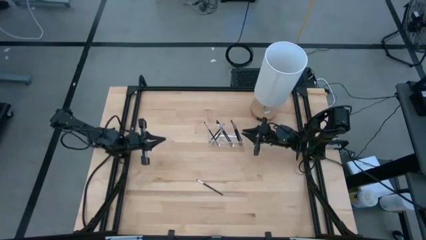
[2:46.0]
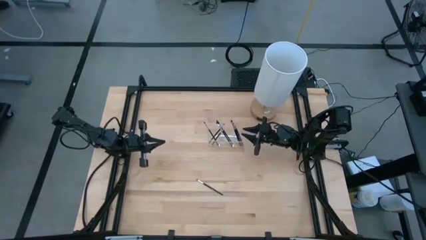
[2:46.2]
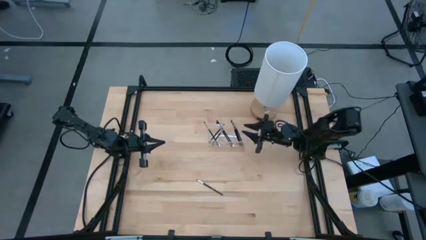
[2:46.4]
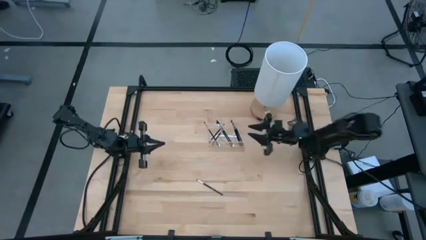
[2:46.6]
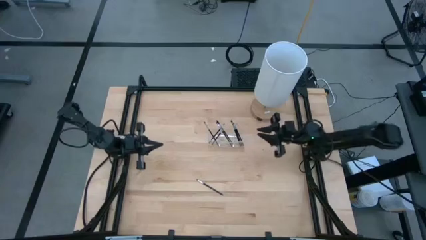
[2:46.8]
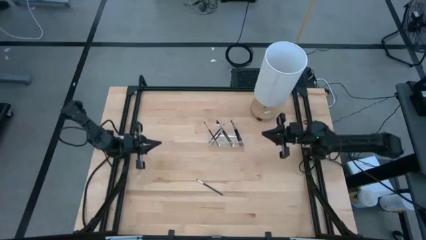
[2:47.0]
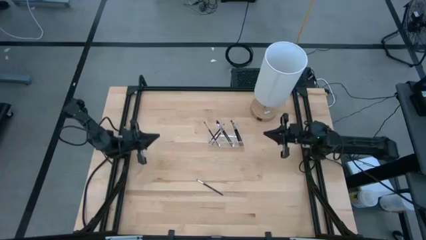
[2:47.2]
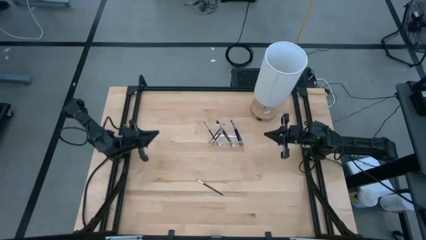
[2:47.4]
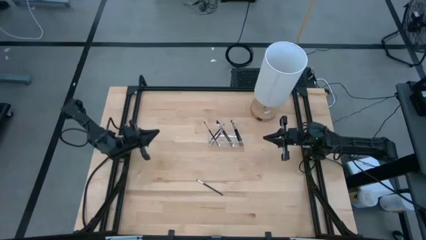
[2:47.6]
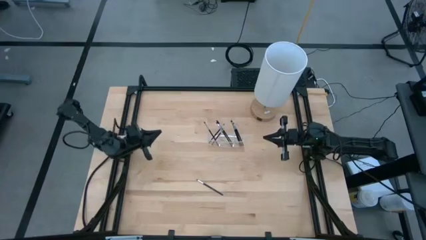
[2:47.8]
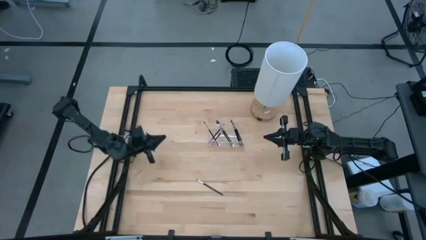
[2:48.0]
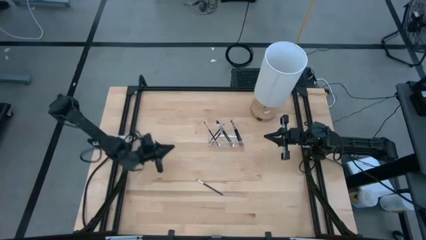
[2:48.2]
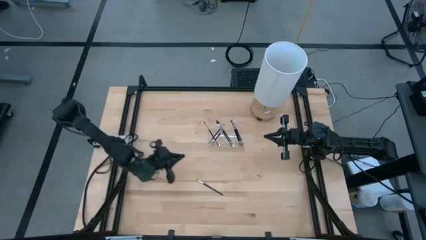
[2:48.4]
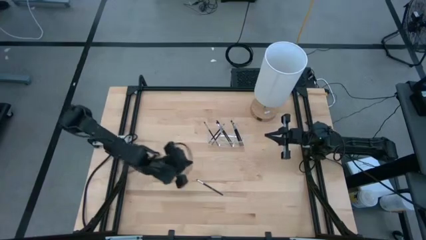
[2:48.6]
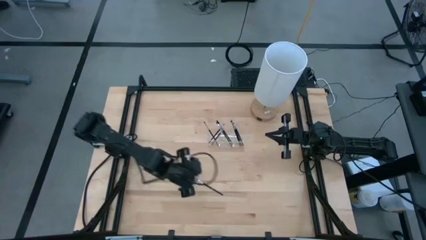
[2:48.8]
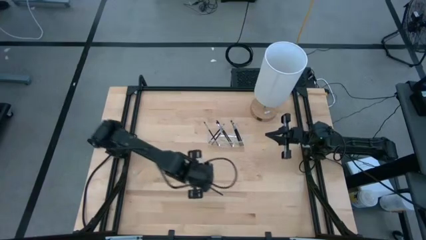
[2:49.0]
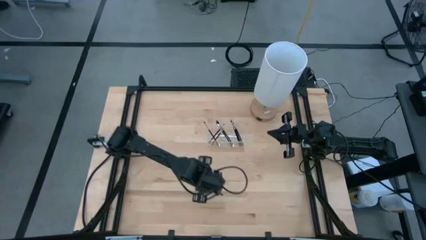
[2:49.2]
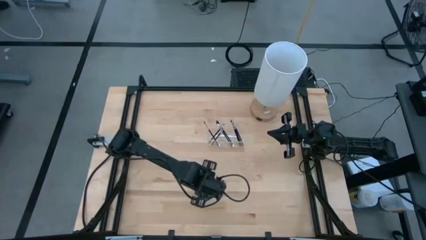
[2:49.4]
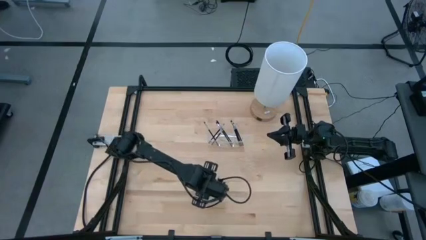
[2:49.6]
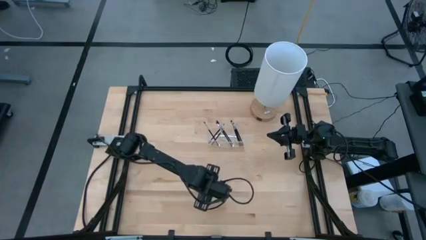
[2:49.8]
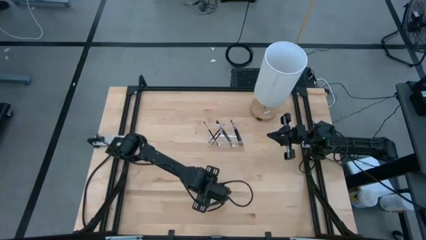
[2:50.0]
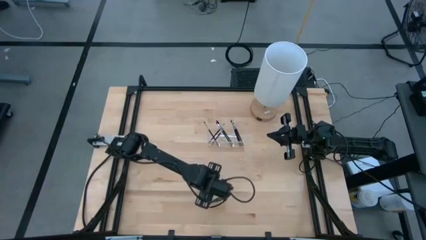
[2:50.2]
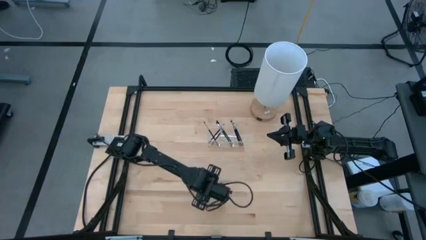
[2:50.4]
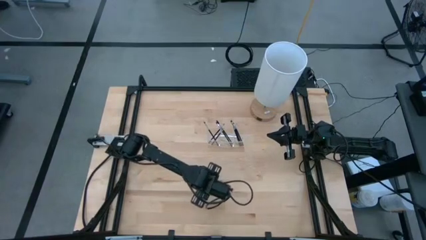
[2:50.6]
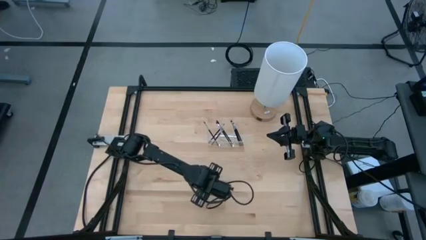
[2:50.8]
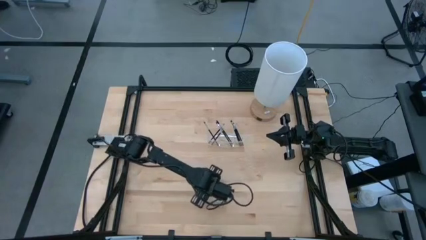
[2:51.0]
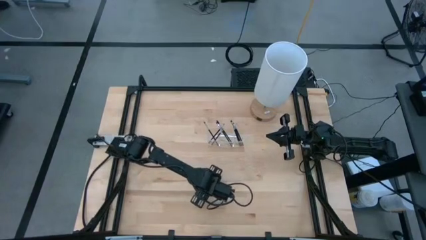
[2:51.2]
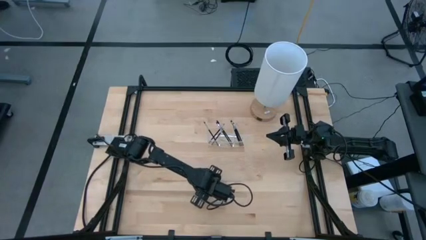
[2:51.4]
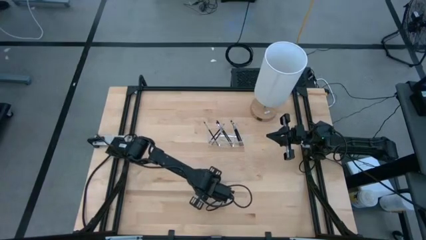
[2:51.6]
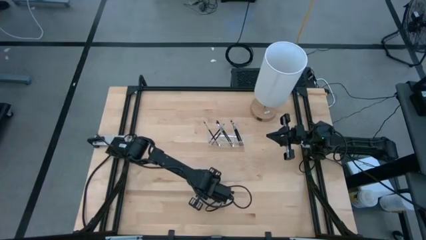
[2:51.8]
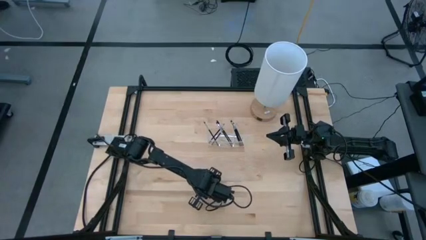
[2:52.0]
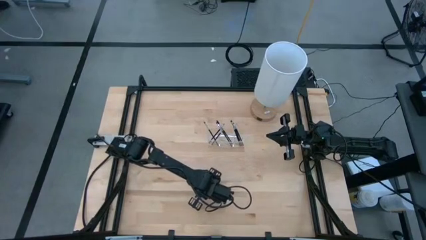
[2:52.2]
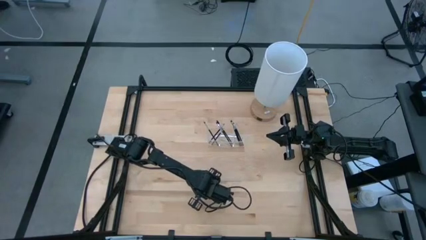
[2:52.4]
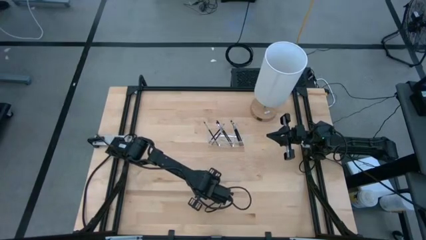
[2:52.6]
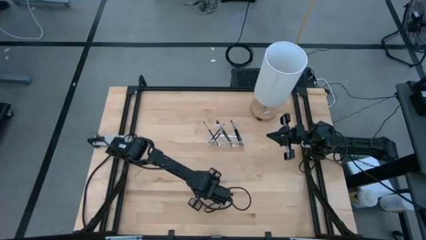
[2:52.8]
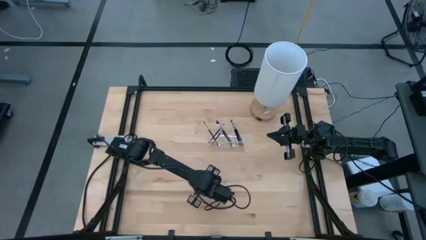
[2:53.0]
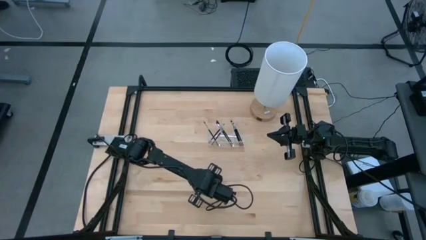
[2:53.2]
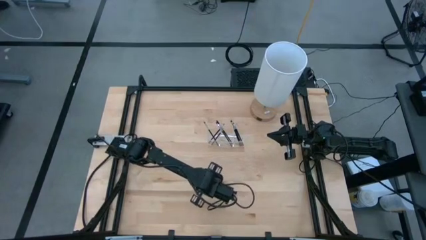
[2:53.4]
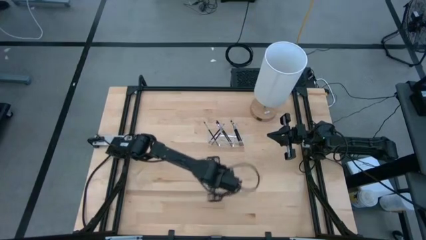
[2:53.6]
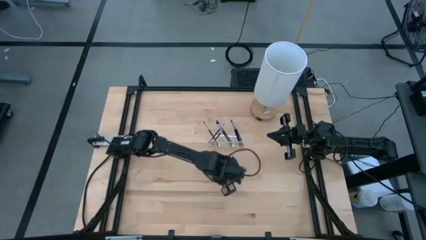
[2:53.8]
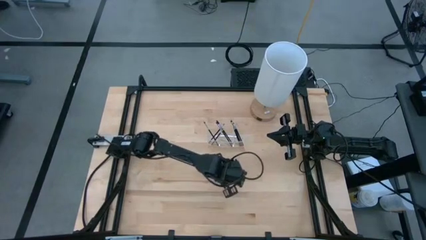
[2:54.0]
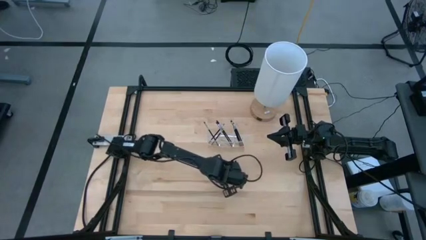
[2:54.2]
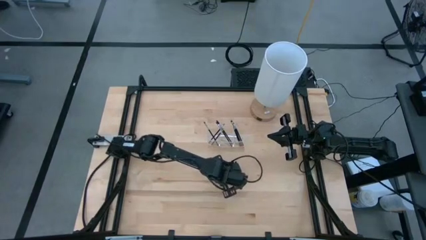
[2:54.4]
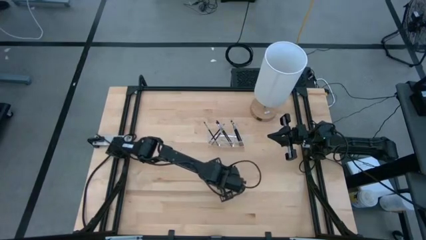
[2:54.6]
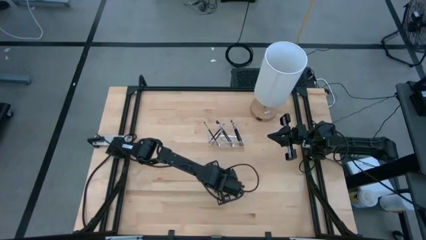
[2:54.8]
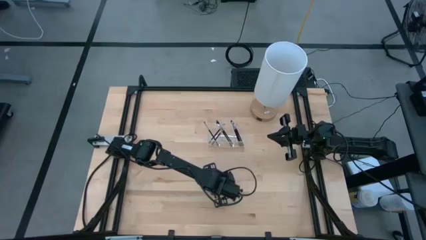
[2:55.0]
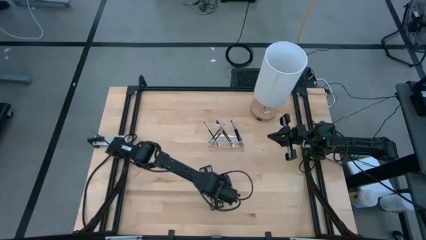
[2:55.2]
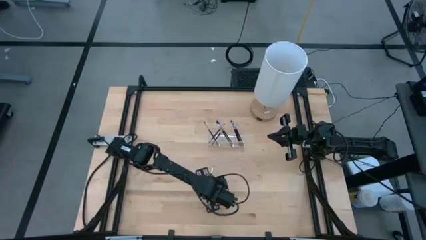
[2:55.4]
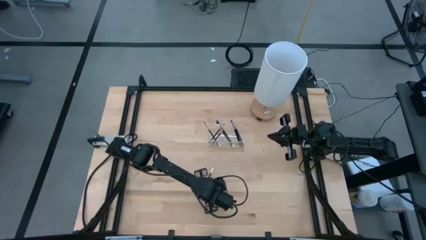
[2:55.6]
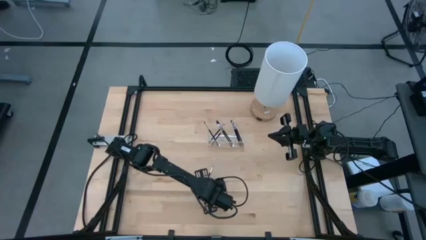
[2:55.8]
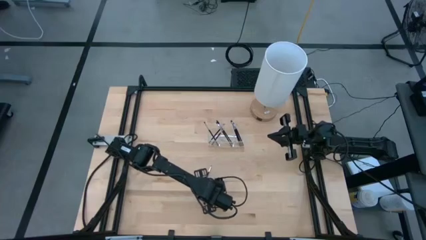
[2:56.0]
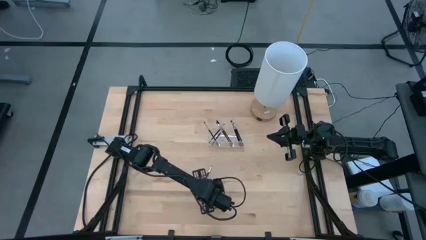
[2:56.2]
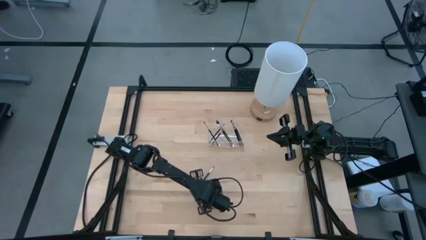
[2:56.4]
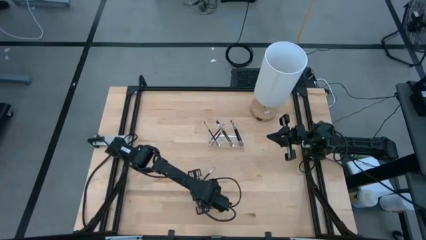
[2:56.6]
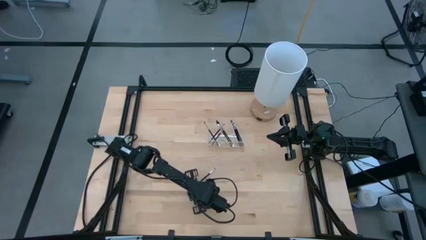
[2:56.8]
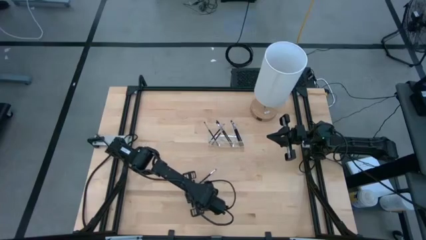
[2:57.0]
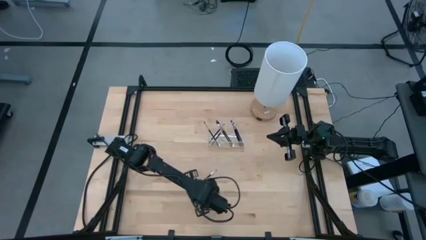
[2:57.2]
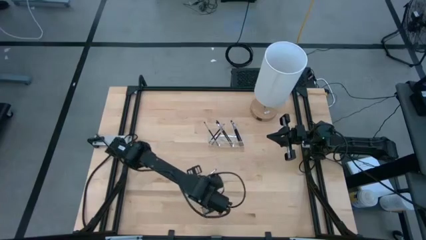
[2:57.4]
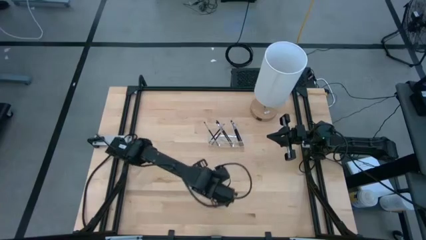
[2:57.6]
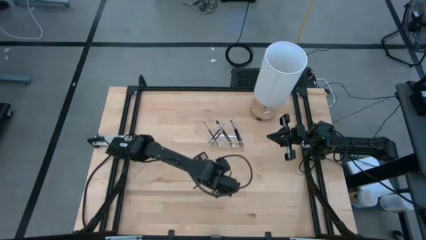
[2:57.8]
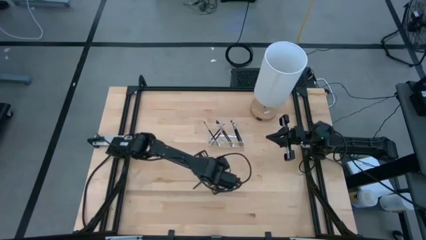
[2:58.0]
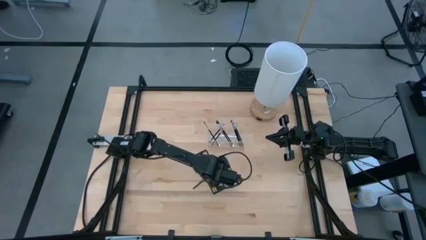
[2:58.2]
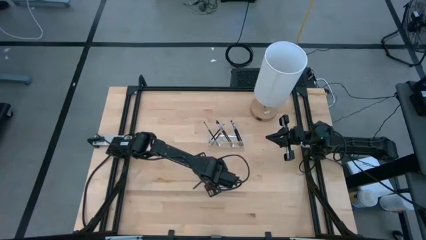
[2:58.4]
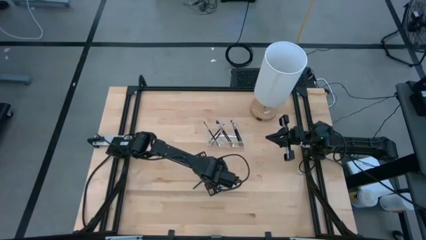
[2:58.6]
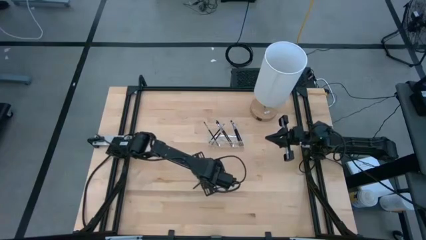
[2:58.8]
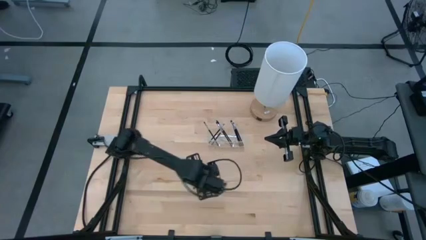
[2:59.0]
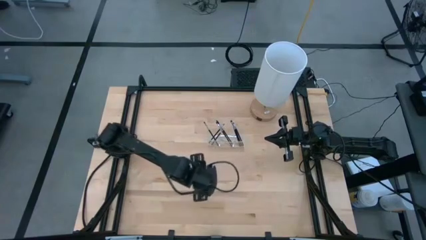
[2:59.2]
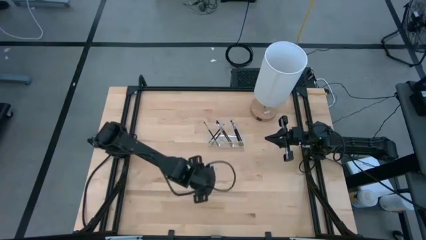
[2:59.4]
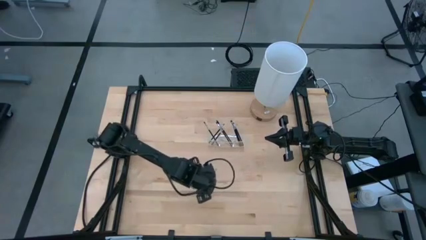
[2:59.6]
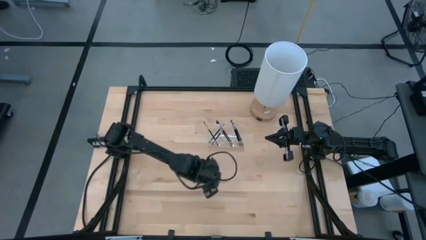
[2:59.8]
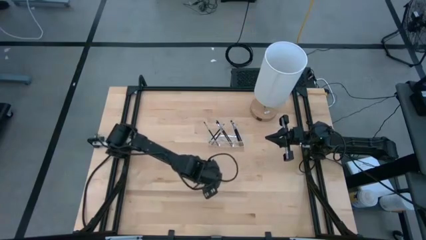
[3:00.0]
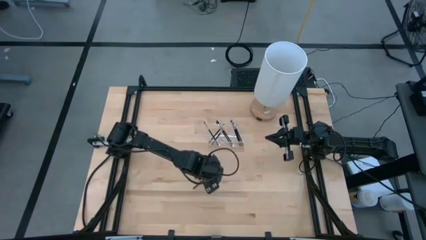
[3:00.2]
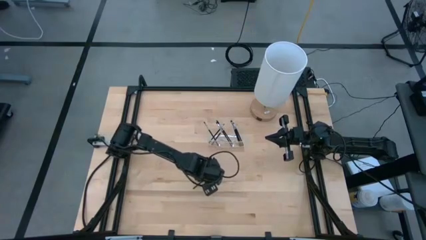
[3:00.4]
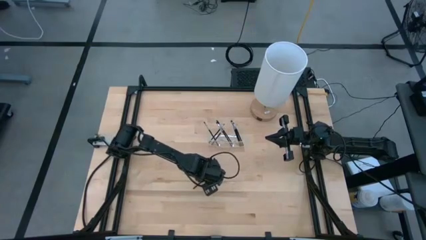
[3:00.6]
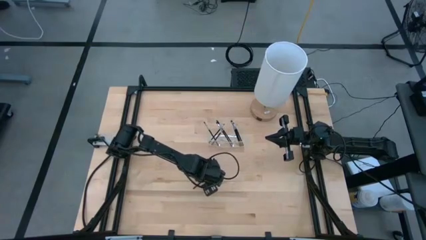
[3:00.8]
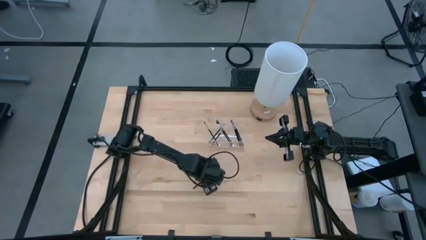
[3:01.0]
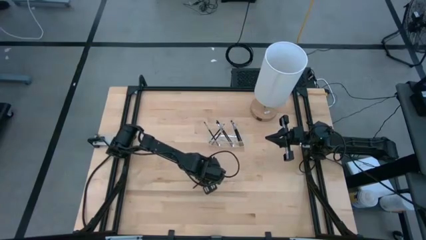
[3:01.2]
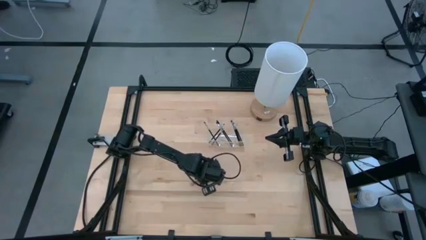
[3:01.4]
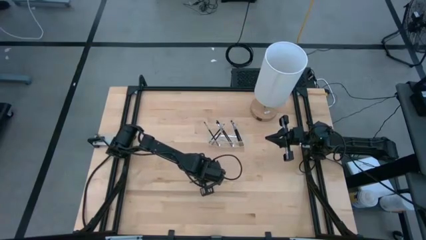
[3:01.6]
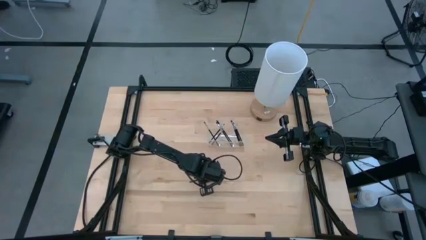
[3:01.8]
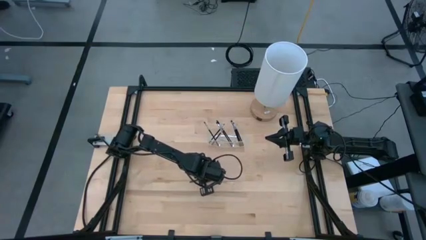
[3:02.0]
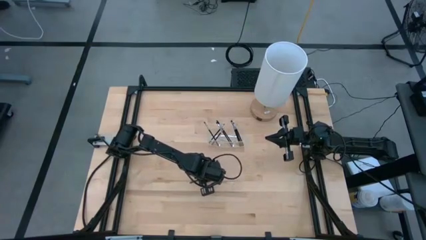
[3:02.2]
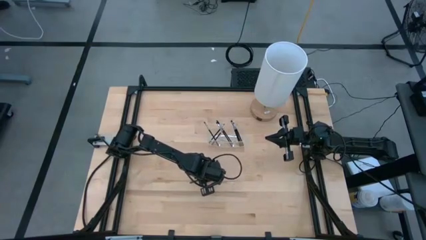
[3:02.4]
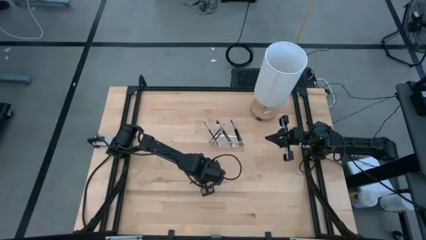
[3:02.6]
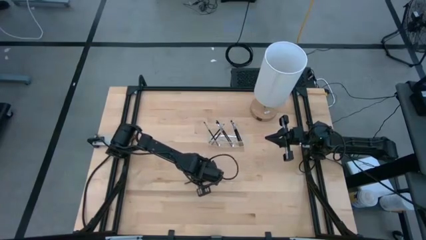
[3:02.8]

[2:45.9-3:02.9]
Task: Put items in baskets/containers
Put the black eyeshadow brush into the left section of the transparent organizer
